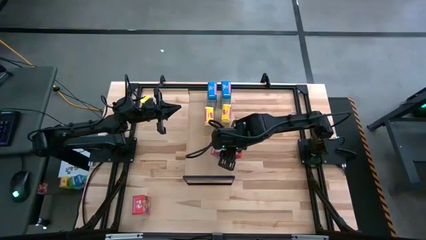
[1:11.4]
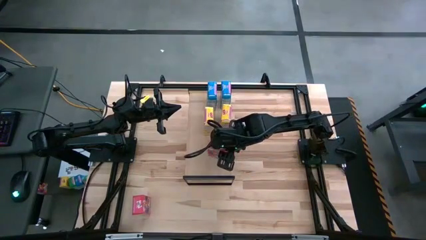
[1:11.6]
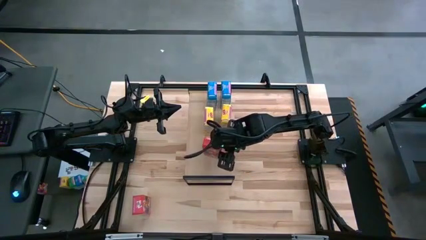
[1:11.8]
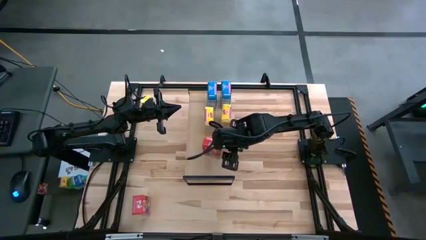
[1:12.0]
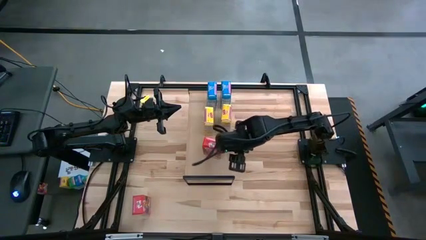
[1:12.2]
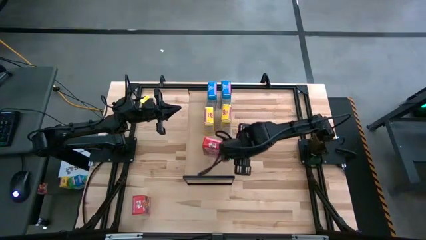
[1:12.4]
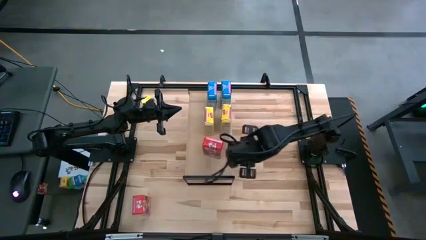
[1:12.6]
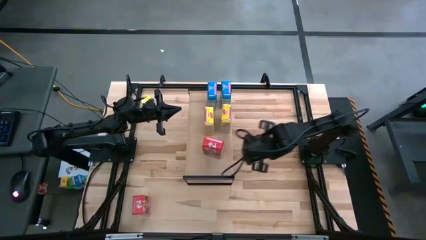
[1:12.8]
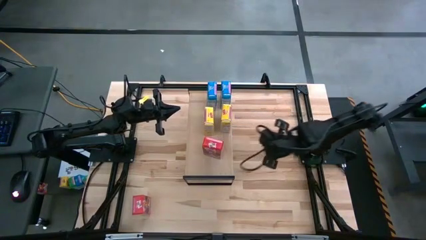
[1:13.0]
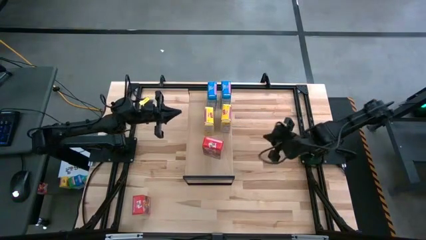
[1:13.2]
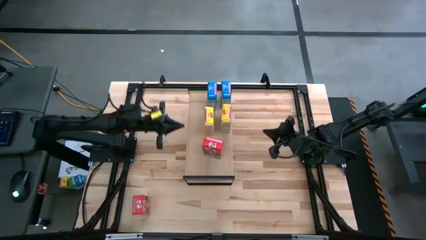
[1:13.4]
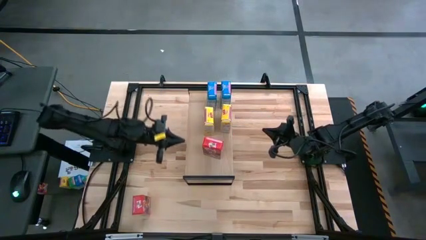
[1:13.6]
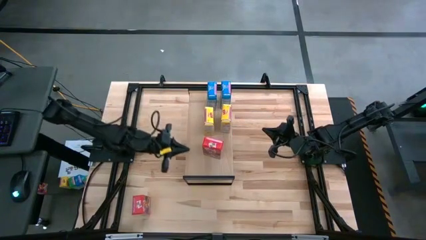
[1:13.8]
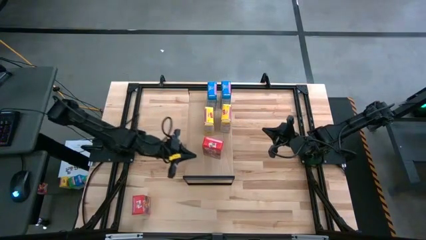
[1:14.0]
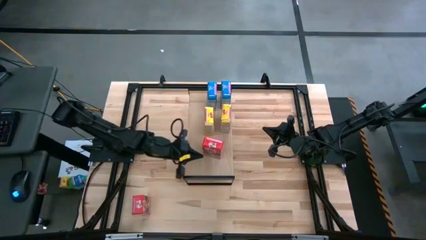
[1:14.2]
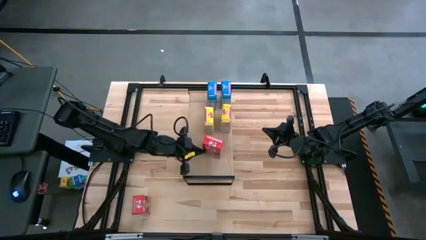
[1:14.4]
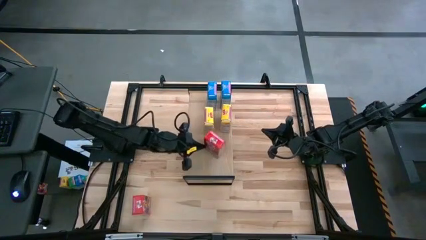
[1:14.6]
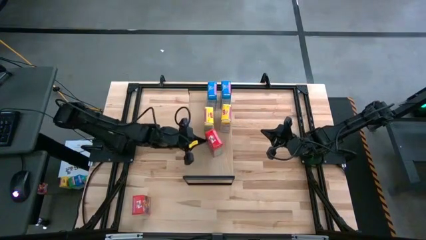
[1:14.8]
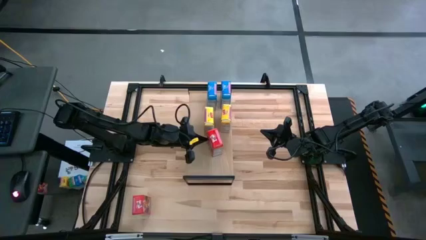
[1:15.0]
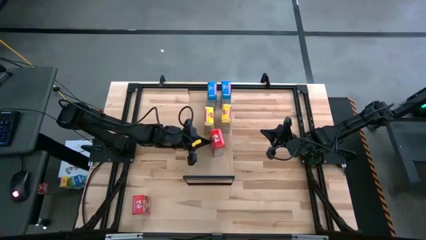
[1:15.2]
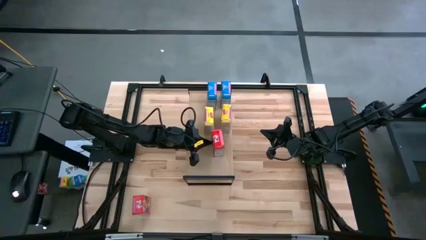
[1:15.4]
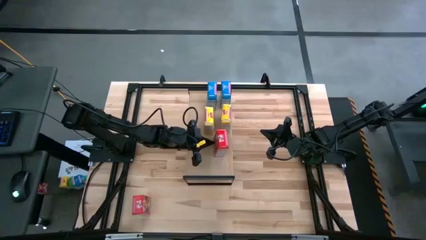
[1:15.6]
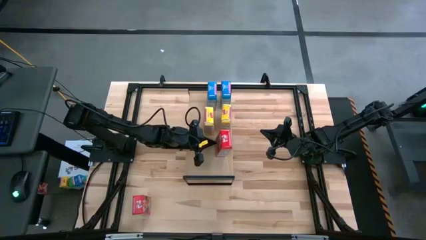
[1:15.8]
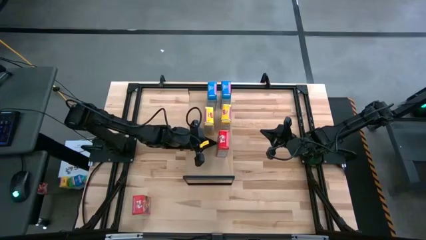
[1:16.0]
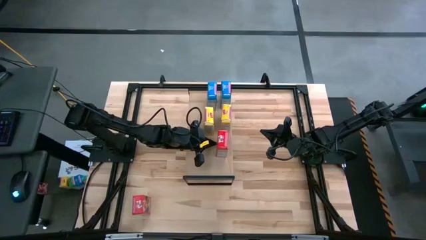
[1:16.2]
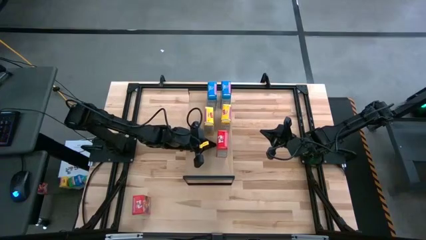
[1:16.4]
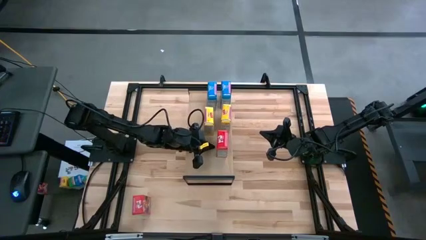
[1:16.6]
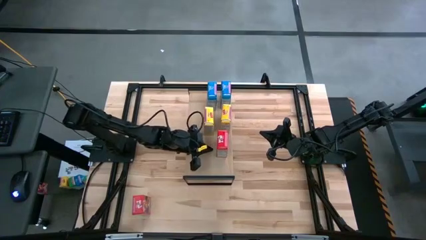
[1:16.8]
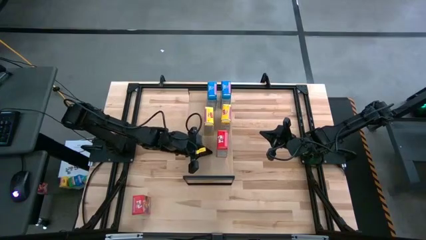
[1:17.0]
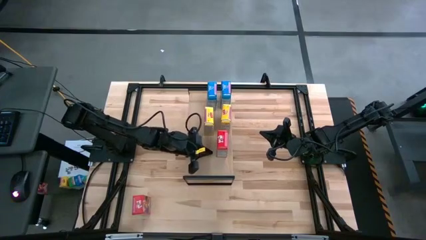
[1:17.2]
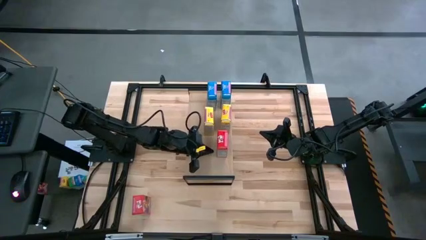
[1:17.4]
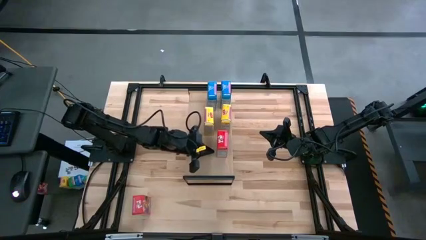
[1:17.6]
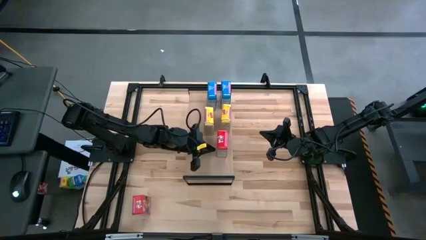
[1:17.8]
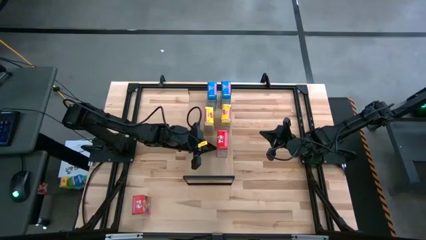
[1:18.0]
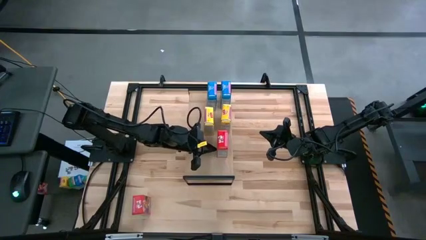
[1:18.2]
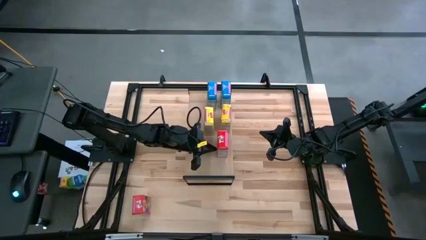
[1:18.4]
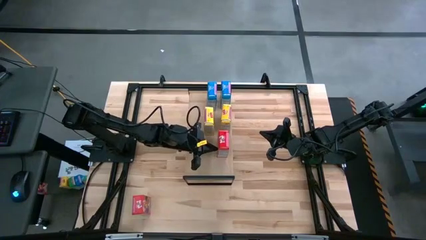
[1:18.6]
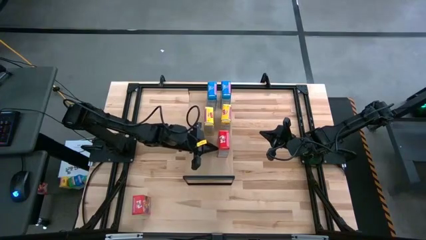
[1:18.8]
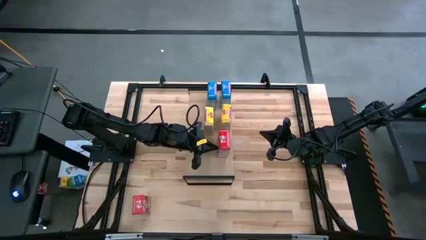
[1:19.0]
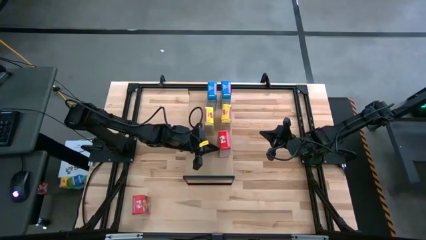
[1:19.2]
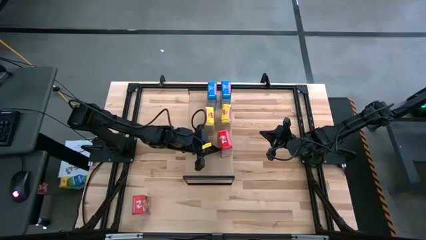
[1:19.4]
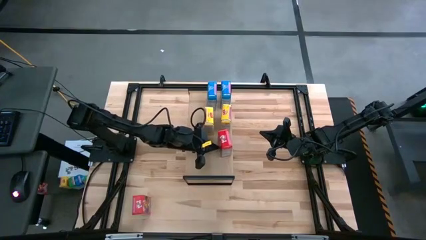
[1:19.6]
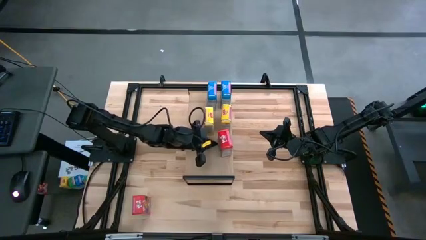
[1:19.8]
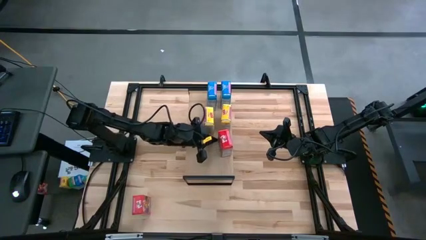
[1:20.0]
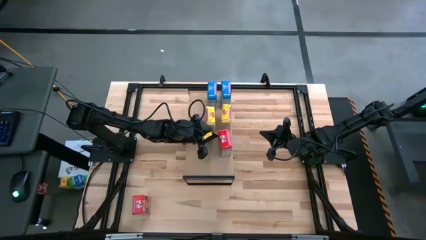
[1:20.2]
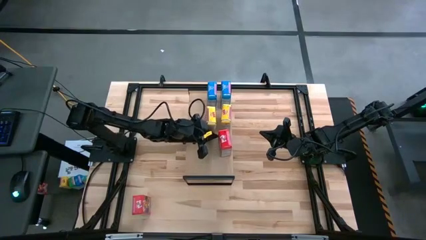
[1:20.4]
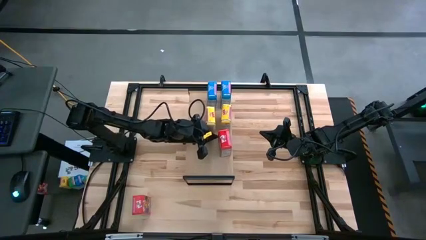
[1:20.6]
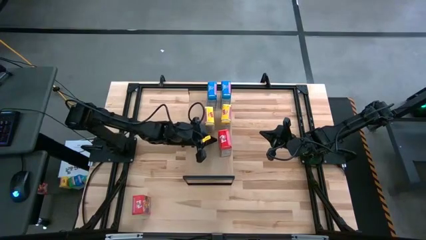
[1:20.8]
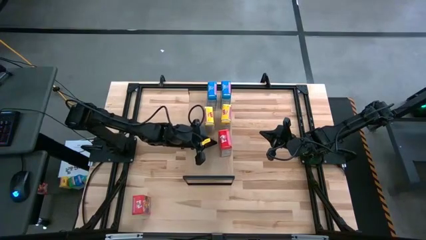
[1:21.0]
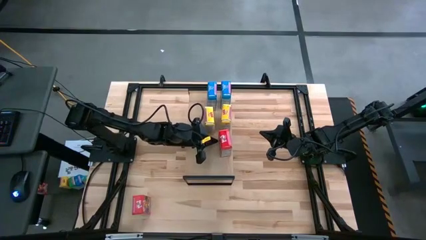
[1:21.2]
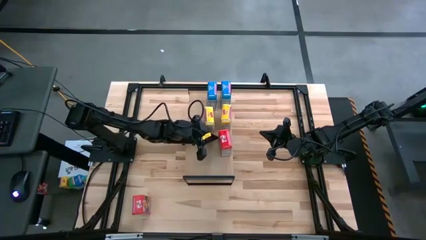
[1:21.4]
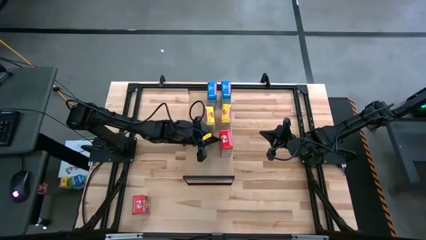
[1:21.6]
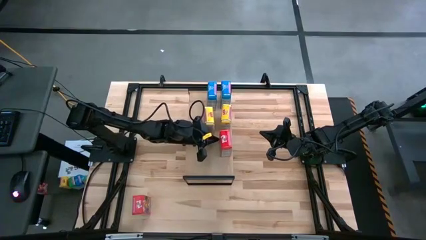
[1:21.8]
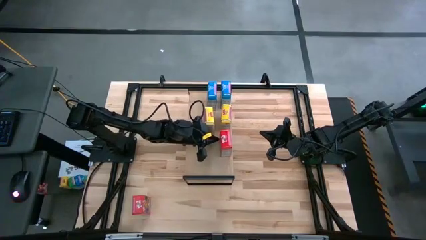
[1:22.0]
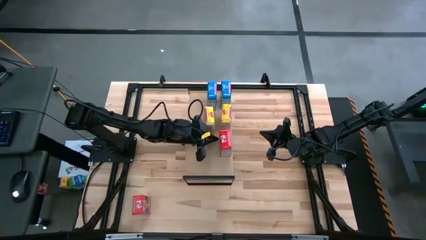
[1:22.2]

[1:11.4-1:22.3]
Task: Stack cereal on shelf
Put the right red cereal box on the shelf

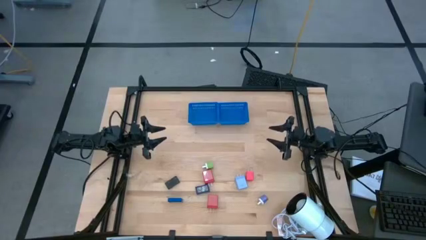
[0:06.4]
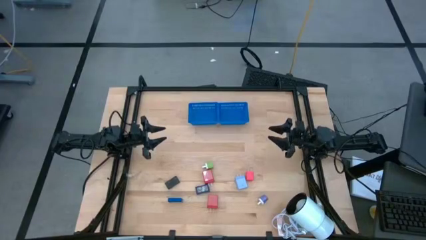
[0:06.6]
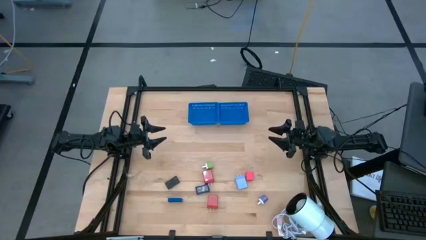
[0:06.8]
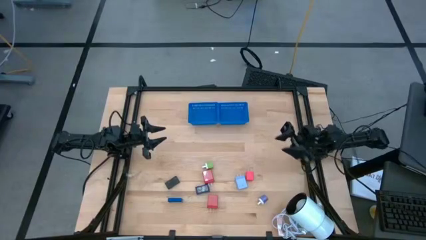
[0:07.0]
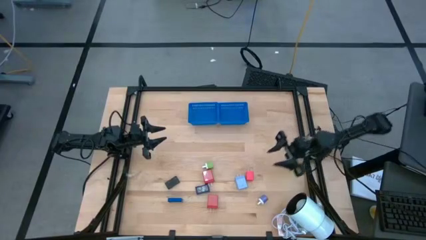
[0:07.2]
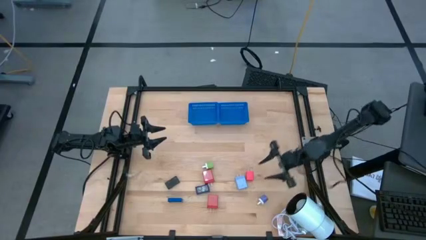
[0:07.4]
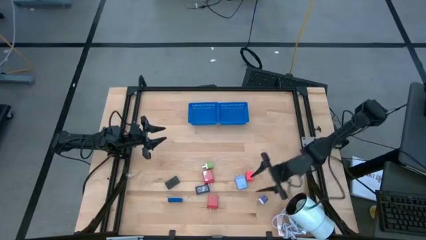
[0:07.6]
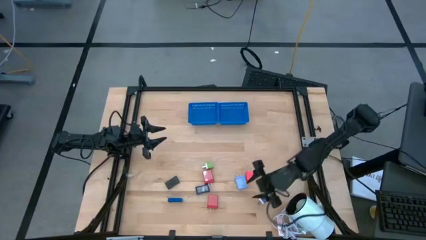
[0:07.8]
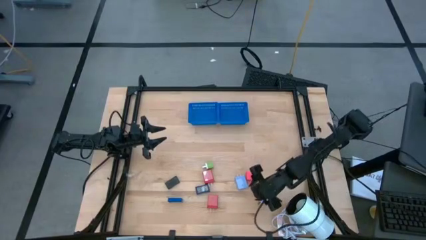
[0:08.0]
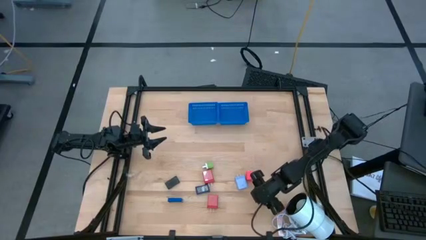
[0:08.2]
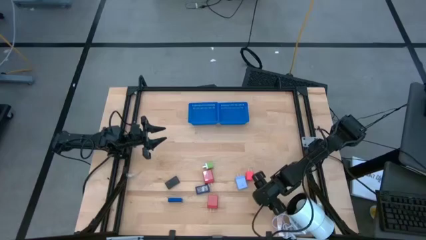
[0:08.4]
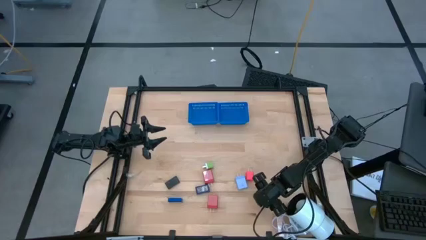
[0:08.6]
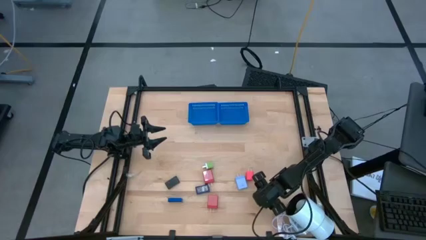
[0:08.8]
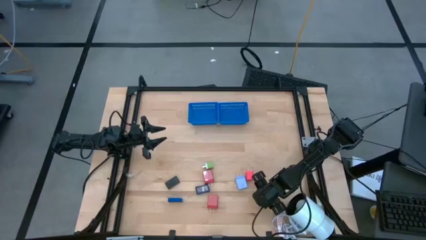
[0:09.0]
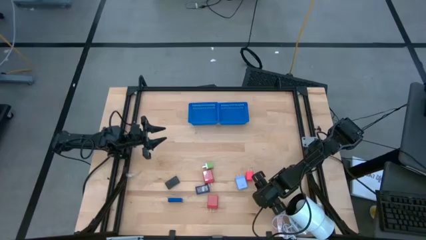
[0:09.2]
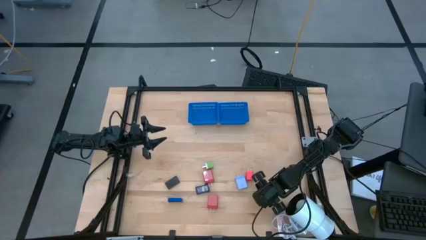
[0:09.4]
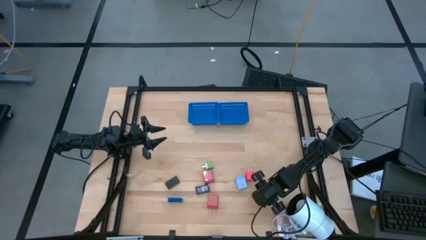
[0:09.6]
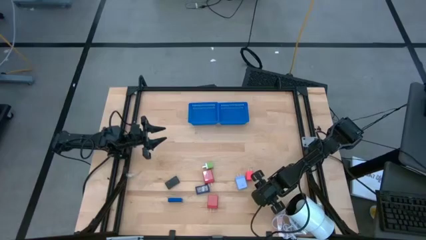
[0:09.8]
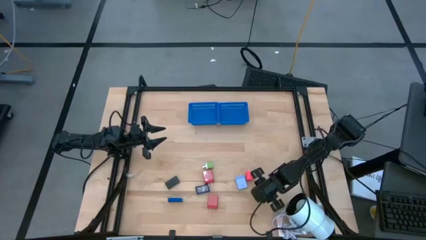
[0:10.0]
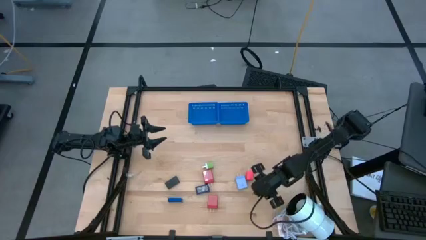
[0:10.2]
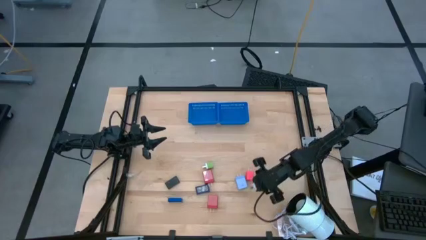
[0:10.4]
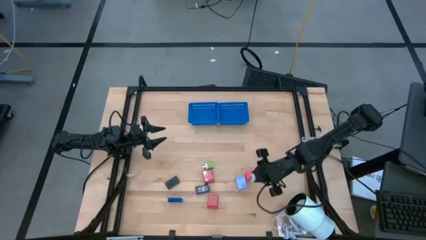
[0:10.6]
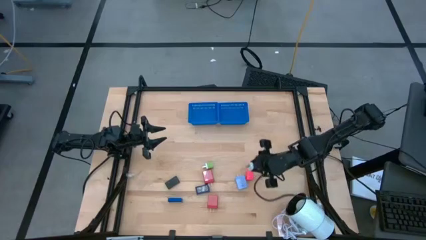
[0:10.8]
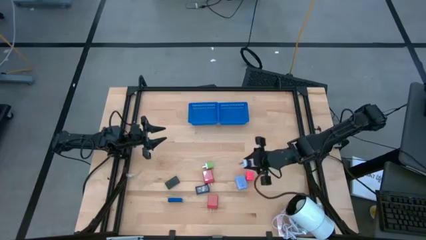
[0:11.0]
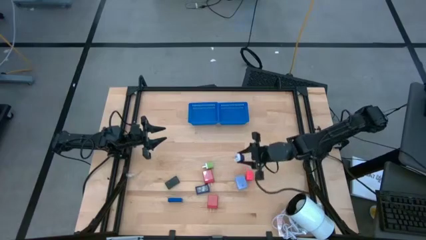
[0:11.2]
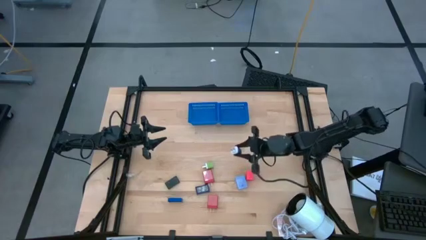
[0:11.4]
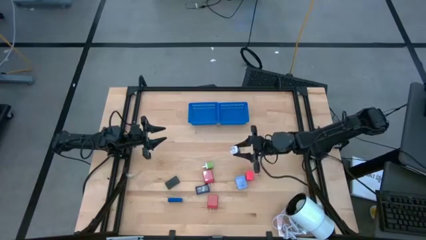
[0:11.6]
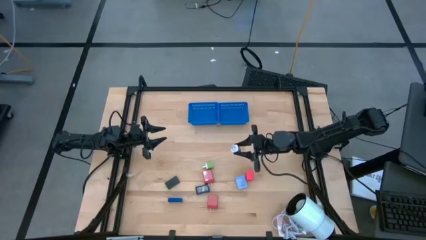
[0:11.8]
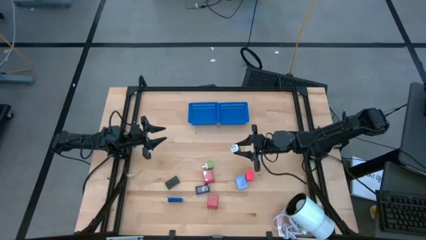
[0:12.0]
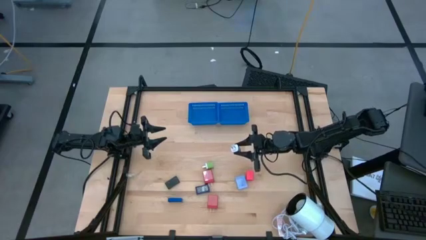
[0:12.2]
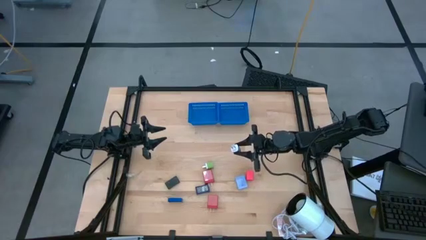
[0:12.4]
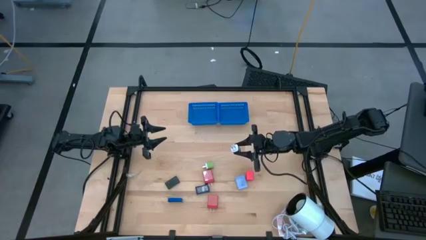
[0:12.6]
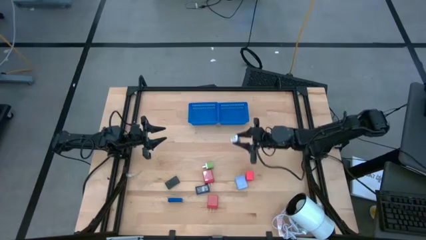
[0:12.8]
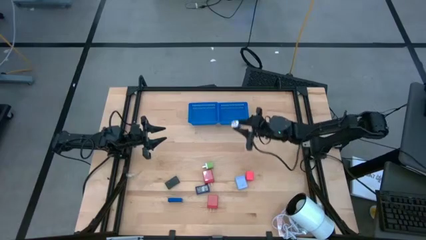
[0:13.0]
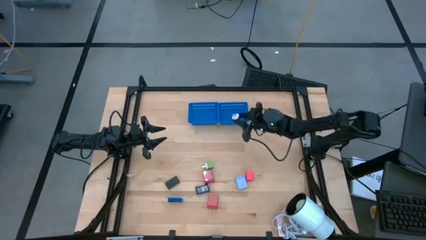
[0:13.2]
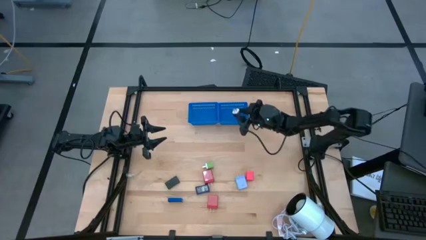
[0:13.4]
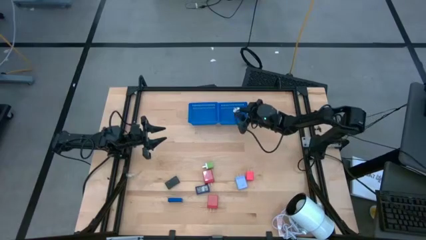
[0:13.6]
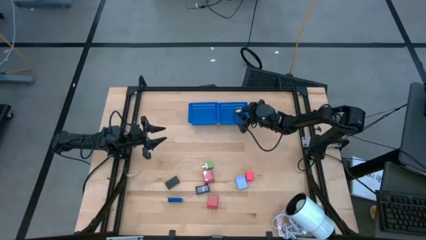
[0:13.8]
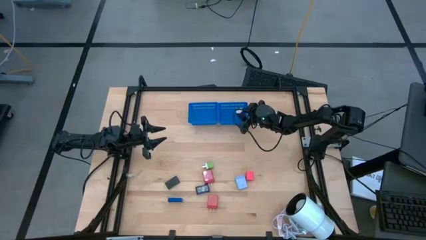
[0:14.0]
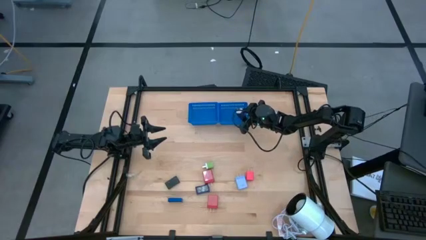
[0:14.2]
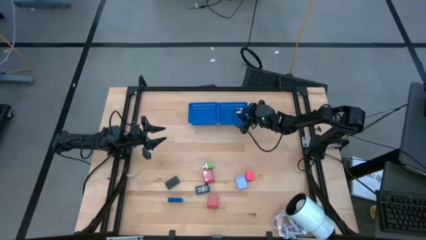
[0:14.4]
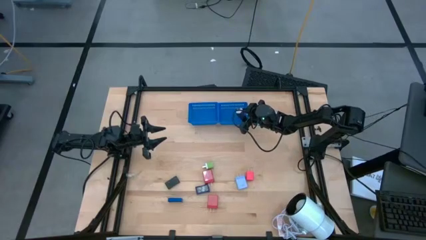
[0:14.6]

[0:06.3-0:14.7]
Task: Pick & Place Office items
Put the purple charger adapter into the right blue bin
